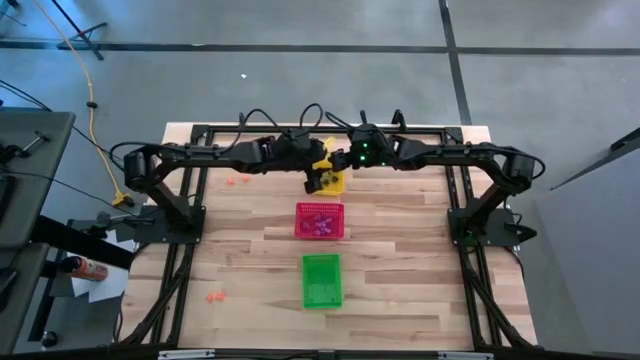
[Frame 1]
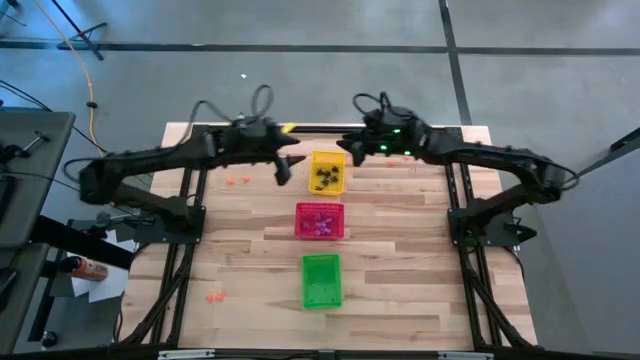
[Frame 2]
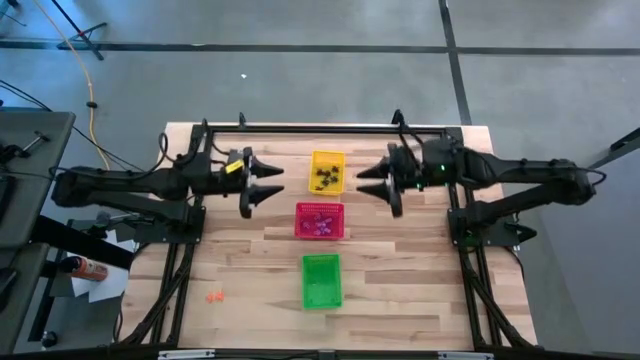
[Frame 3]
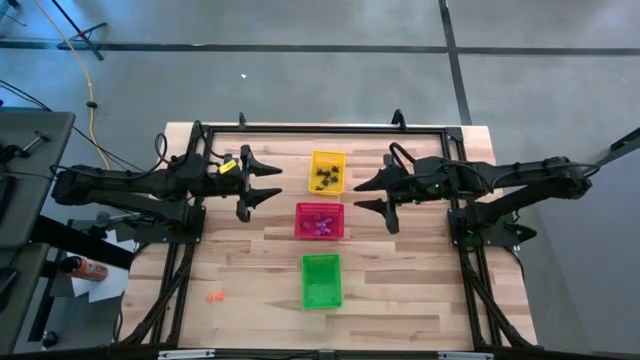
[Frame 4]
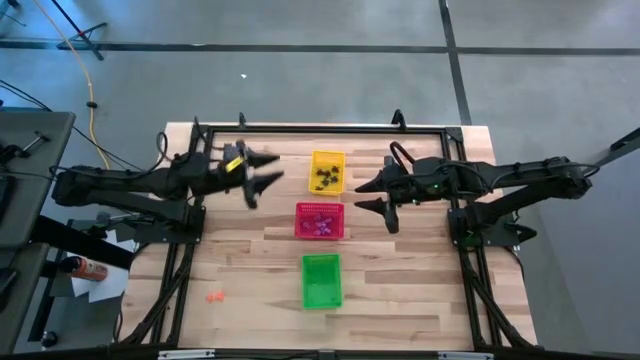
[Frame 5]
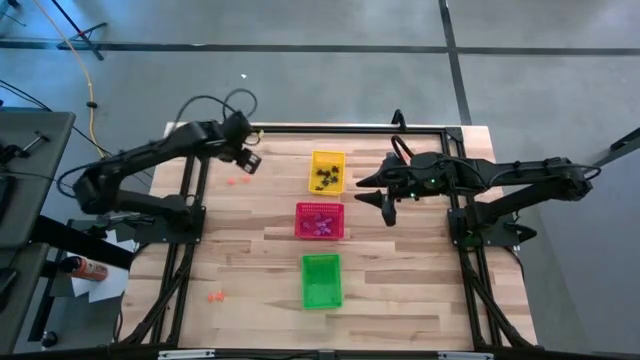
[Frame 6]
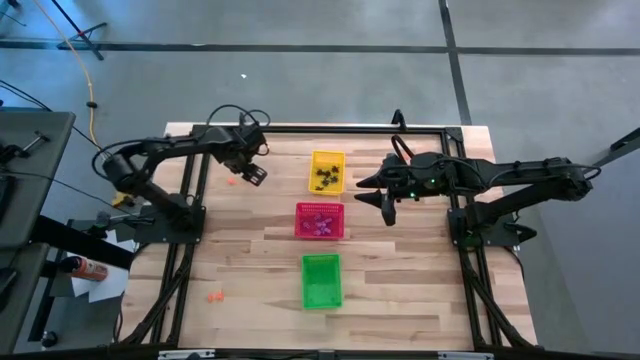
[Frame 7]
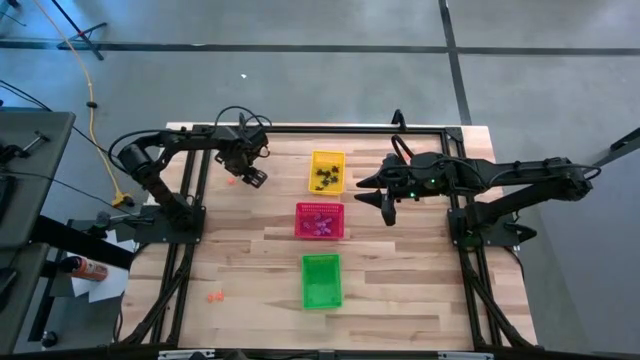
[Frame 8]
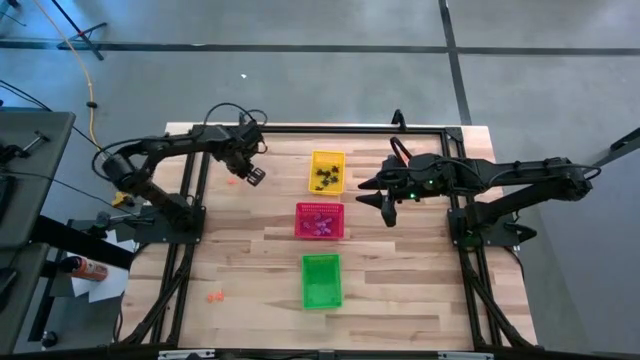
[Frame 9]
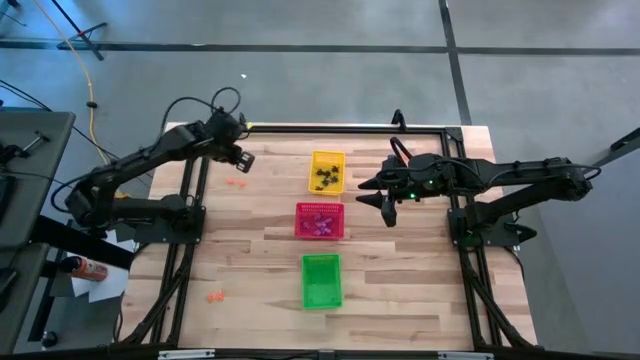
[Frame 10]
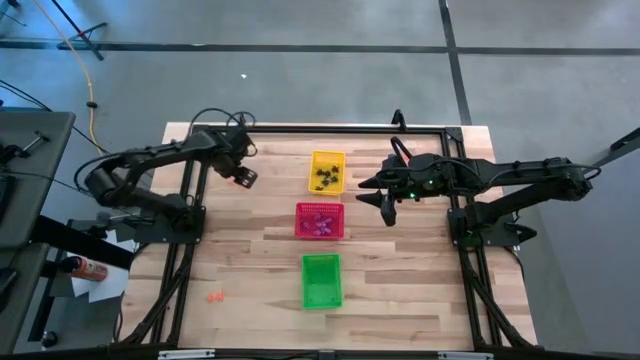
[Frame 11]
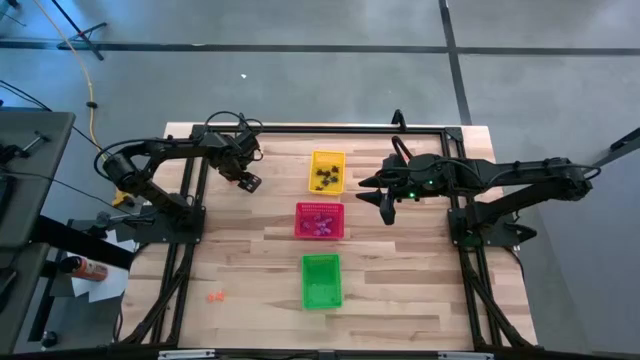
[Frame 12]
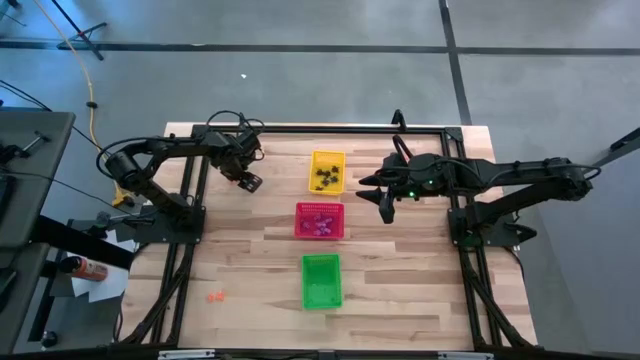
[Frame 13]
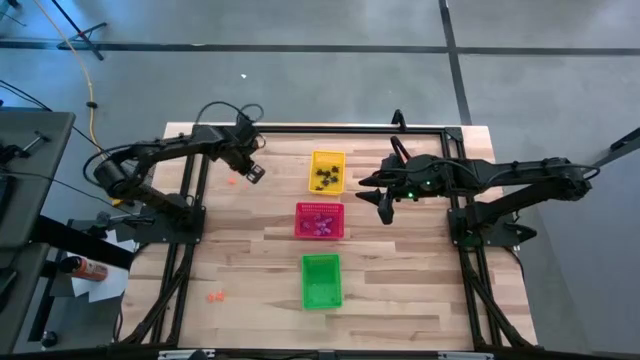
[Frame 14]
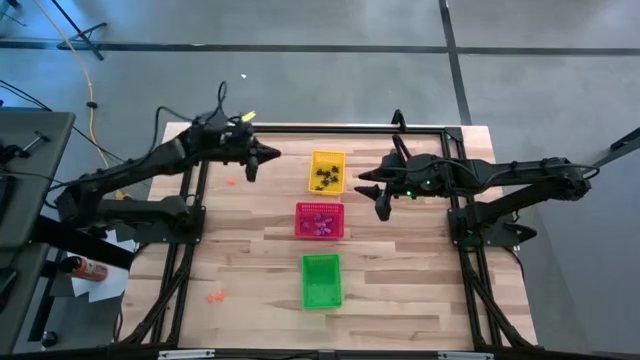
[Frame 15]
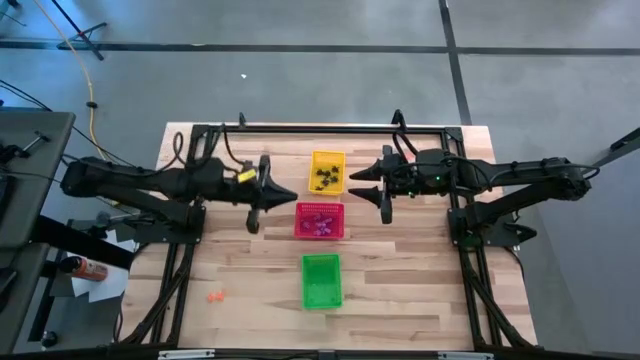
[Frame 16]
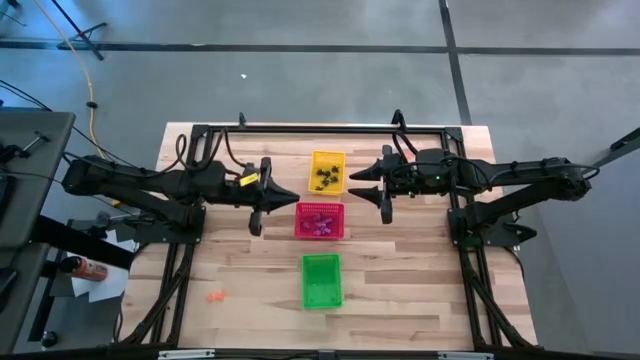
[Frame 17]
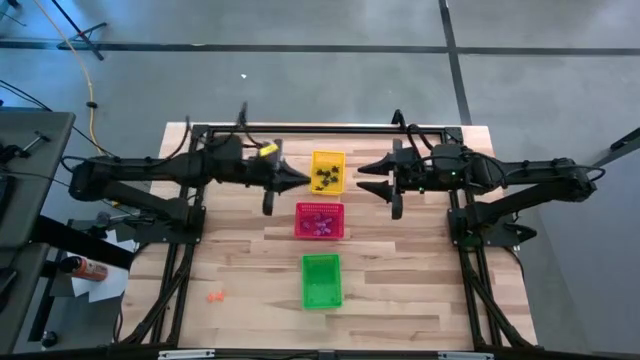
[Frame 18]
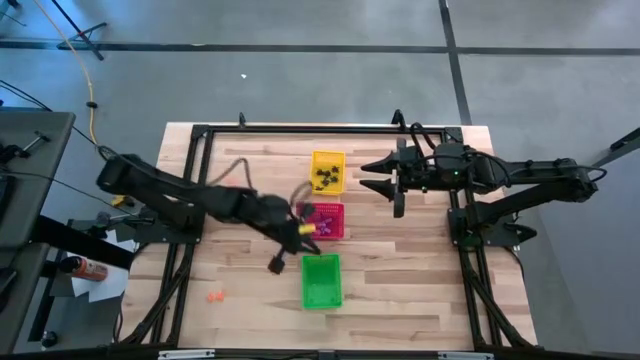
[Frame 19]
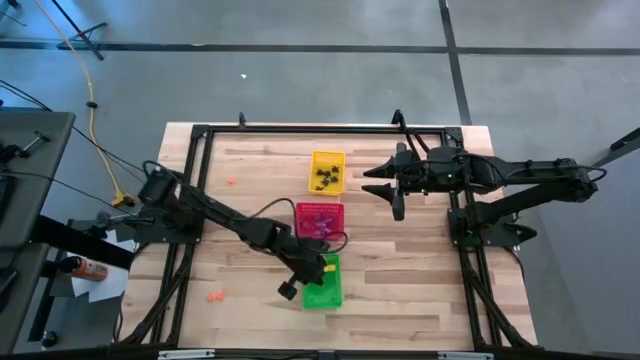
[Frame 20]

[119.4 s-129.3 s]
Task: Sort Halloween decoration
Put the orange spider toy into the green bin

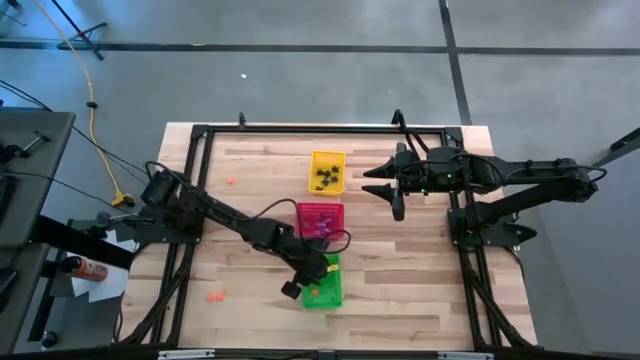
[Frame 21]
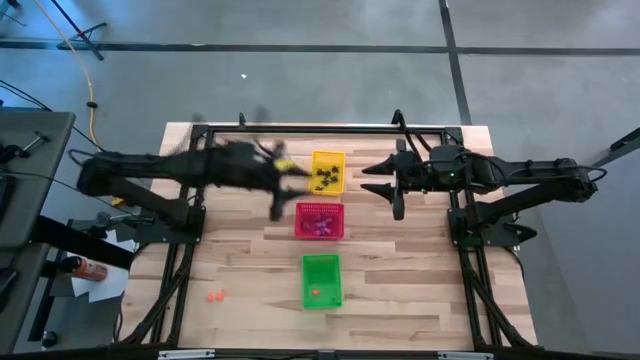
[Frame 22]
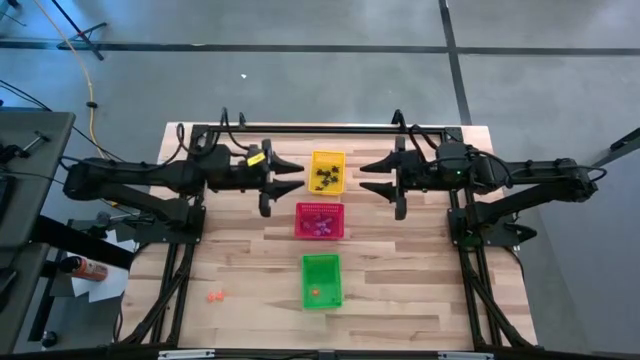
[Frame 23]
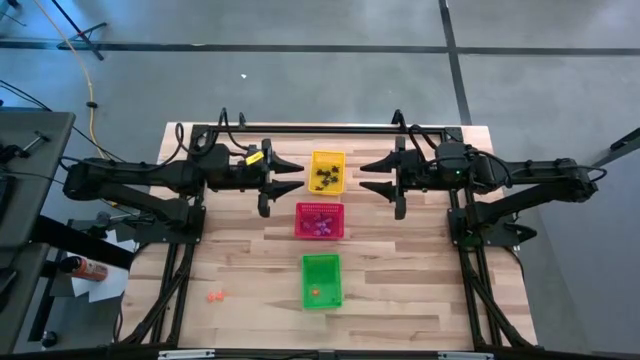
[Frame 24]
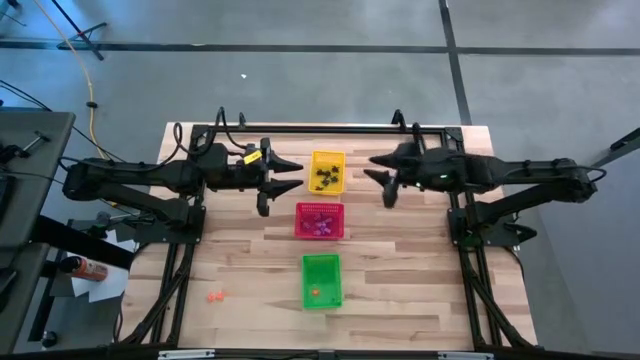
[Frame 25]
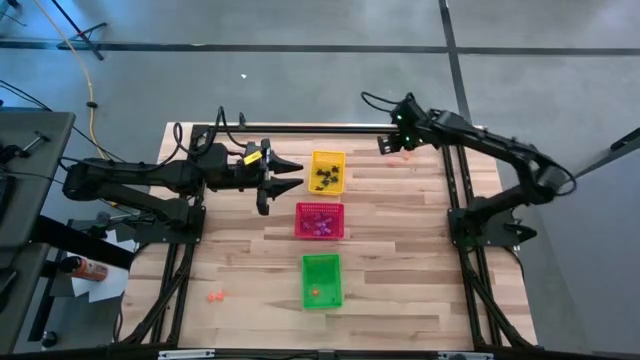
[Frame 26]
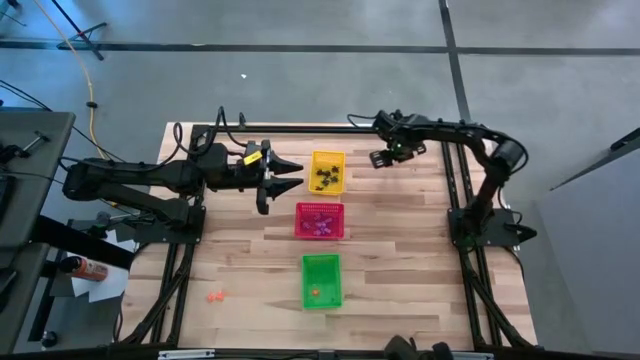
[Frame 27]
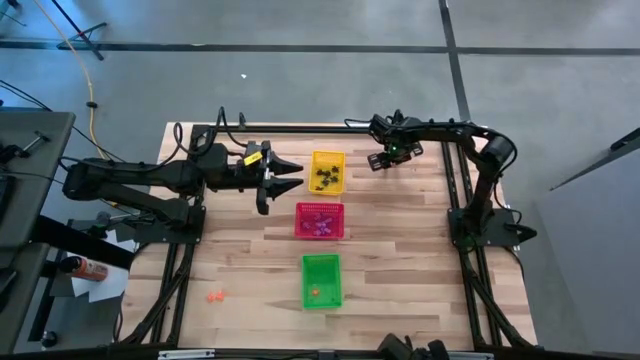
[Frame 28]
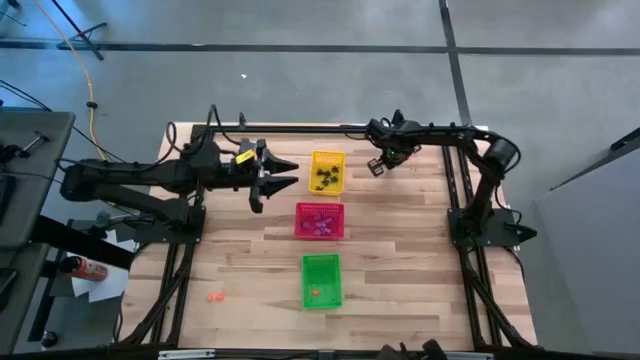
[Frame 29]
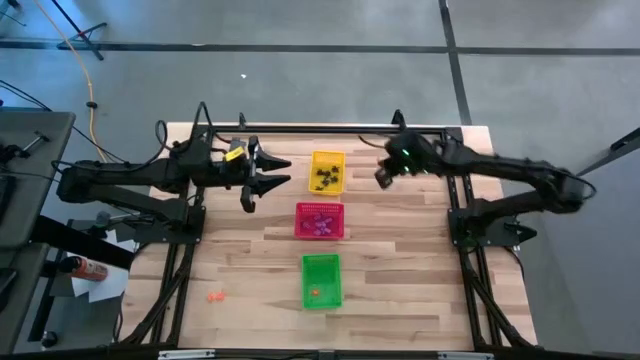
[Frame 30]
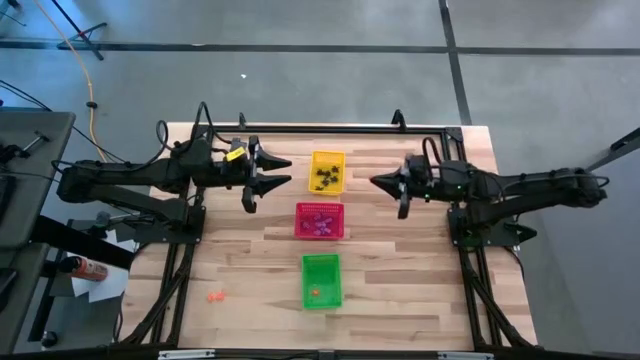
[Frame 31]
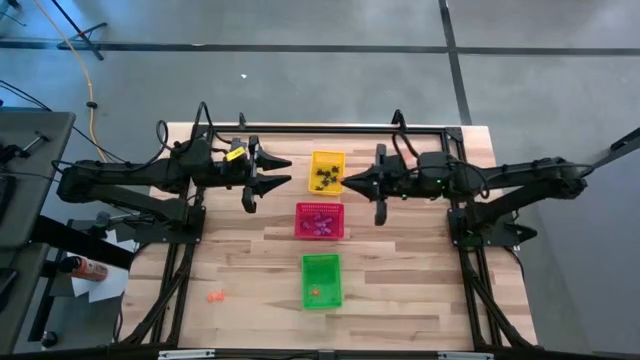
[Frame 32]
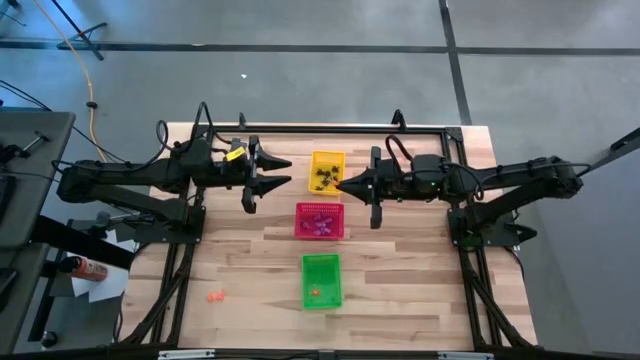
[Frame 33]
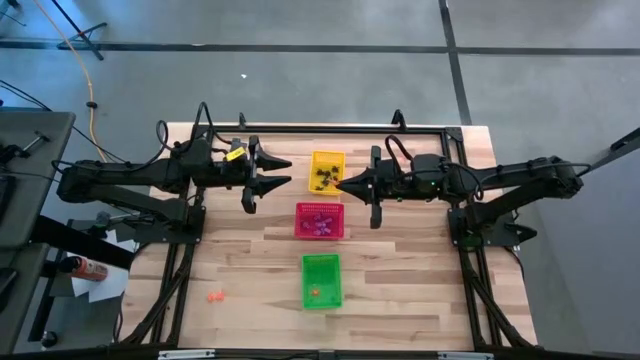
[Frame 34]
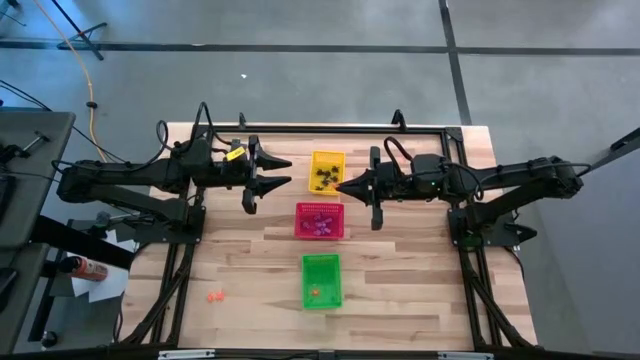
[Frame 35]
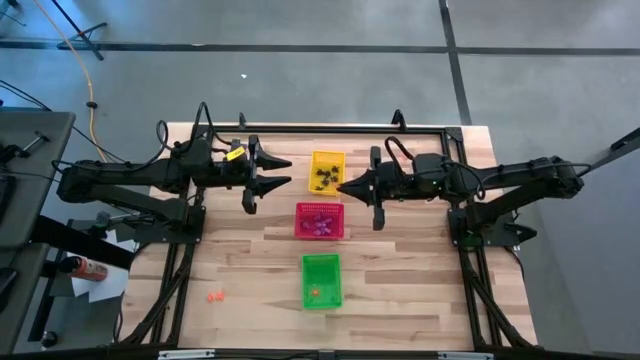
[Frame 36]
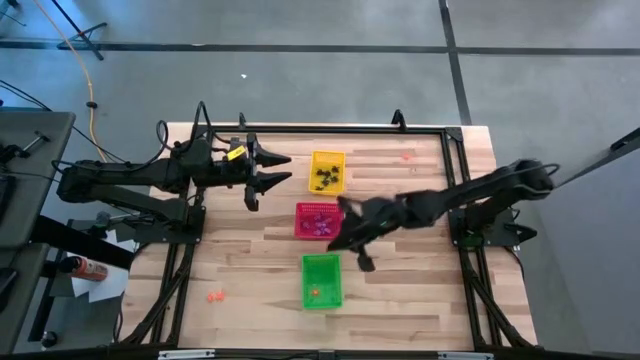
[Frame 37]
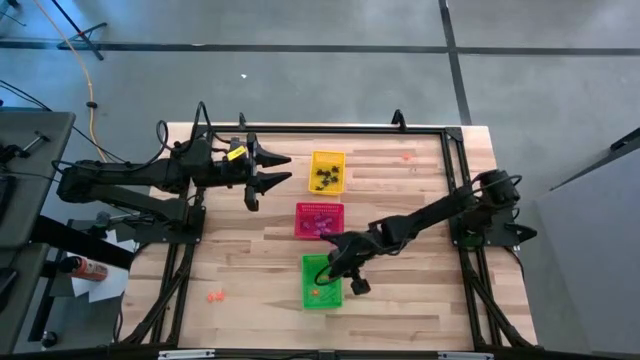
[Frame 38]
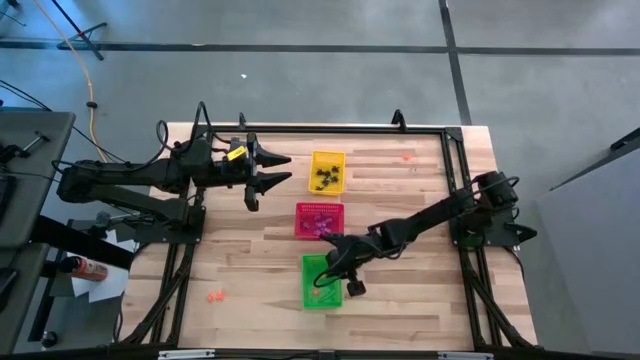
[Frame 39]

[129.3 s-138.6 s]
Put the orange spider toy into the green bin
